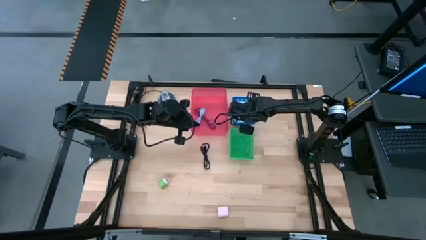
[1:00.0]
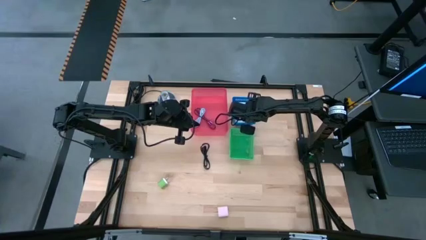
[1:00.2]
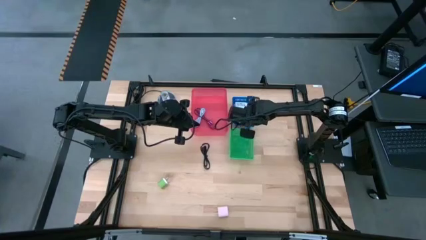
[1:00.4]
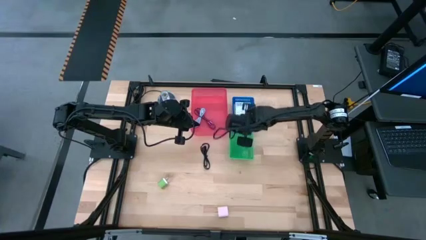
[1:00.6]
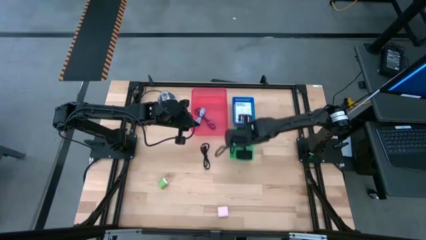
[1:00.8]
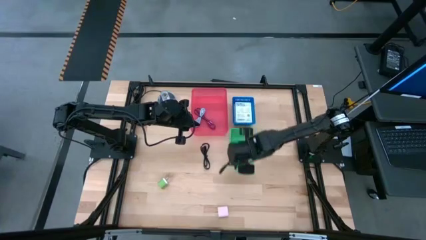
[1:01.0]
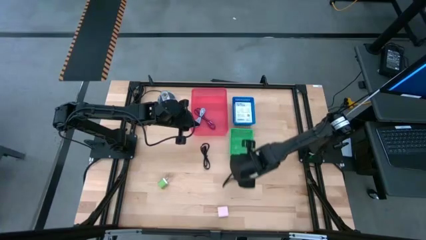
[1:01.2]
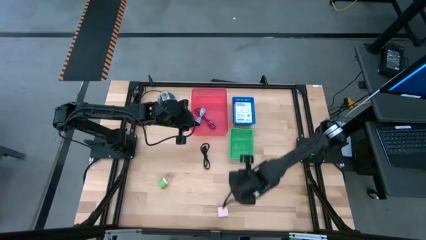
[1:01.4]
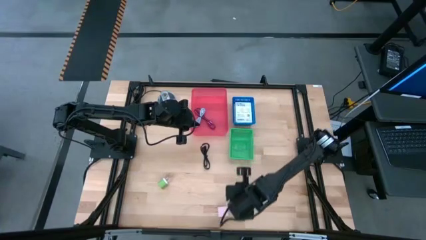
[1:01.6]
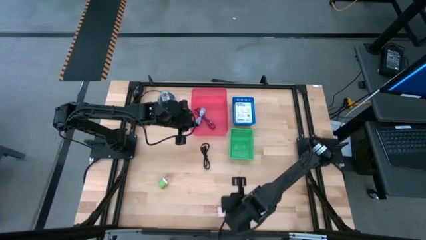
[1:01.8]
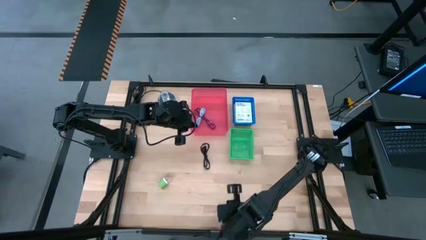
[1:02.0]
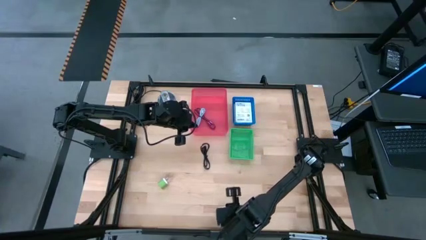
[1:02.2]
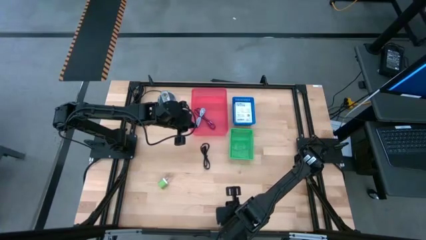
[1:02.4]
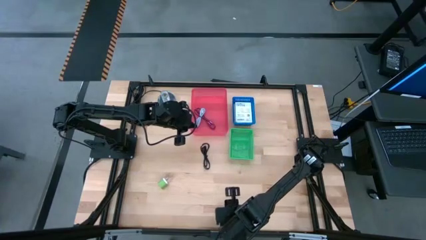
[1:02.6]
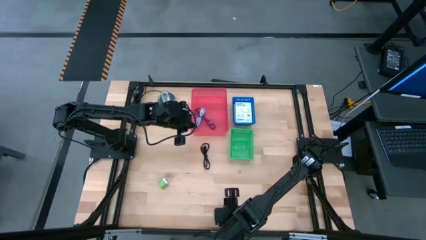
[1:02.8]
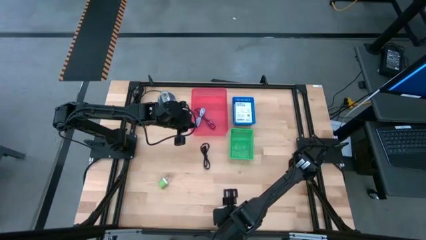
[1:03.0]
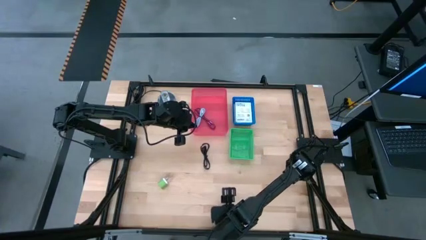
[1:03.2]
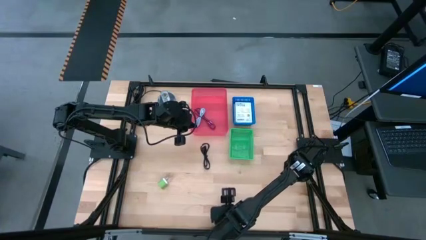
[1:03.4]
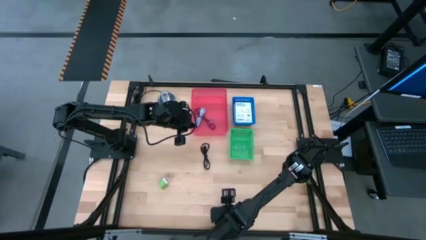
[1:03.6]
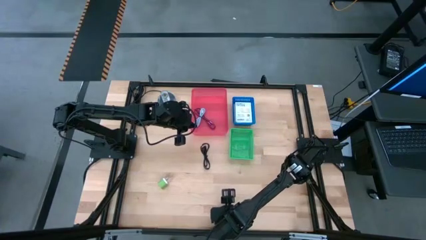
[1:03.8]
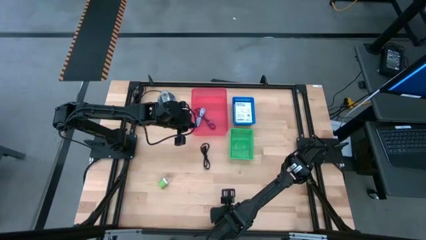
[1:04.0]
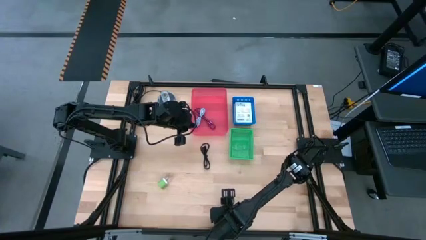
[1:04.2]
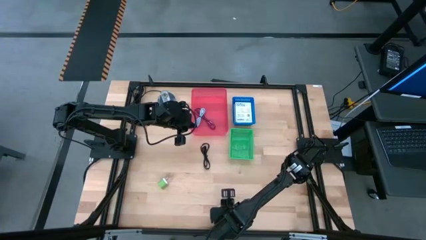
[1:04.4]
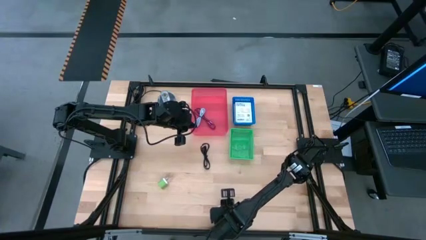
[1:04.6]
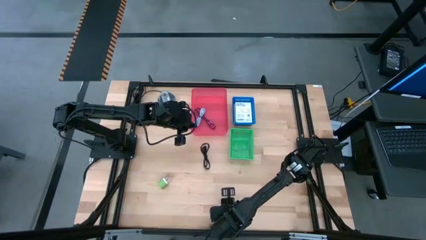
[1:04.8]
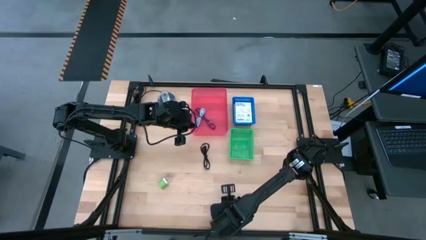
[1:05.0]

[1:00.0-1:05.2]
Task: Pick and place items into bin
Put the white charger adapter into the green bin

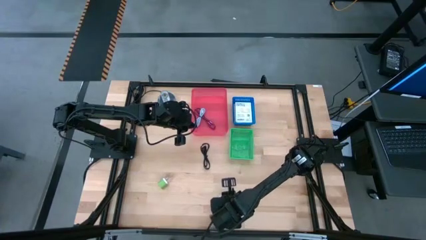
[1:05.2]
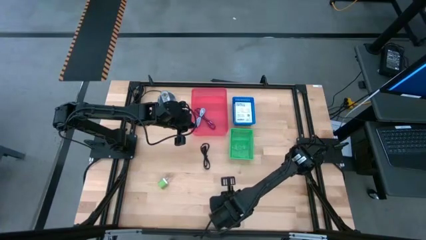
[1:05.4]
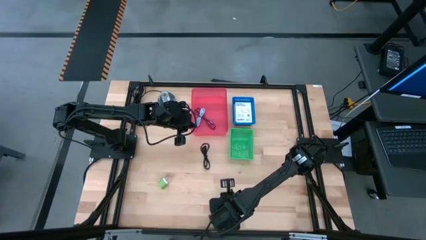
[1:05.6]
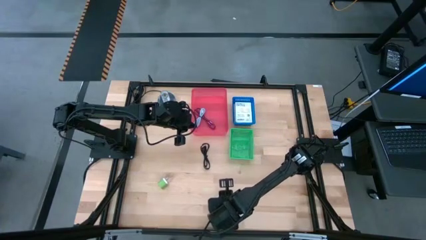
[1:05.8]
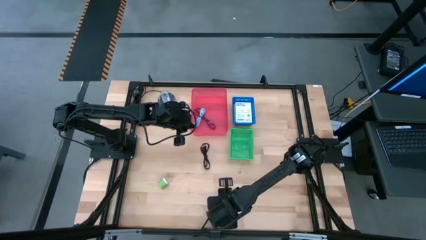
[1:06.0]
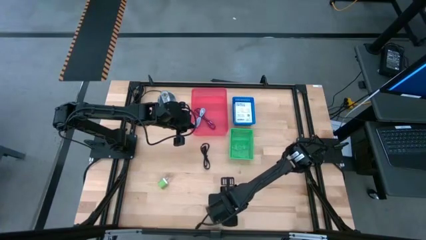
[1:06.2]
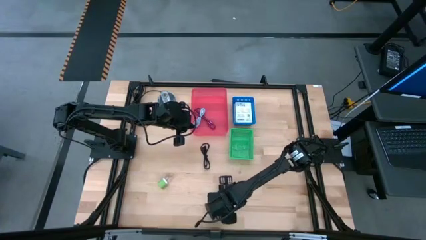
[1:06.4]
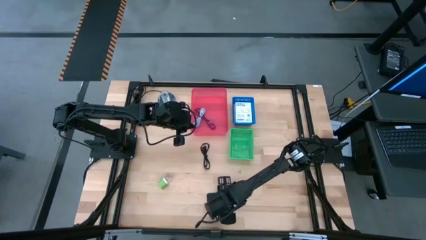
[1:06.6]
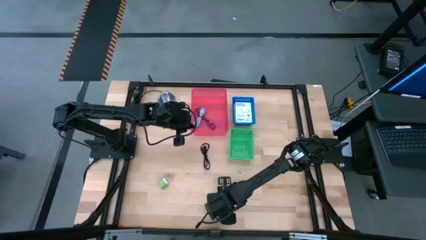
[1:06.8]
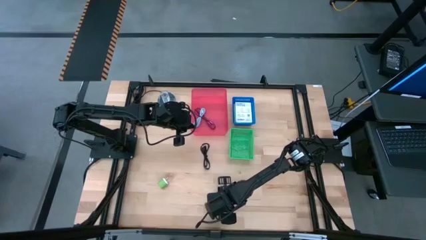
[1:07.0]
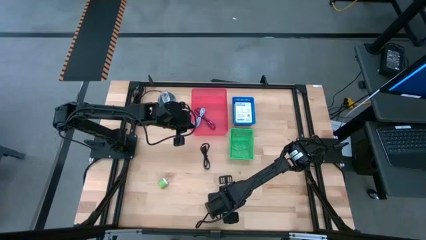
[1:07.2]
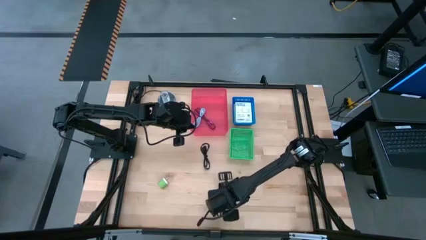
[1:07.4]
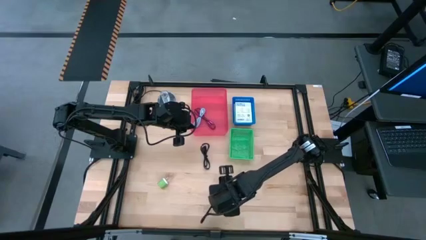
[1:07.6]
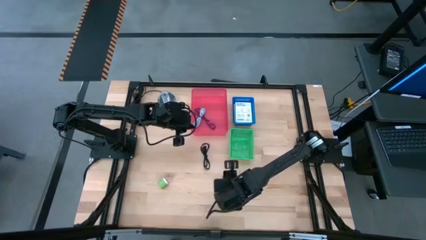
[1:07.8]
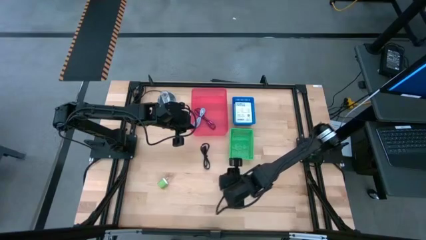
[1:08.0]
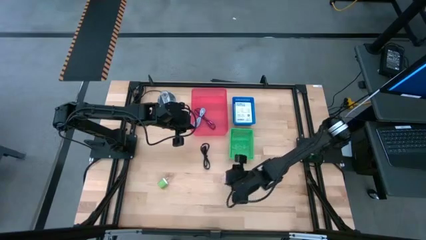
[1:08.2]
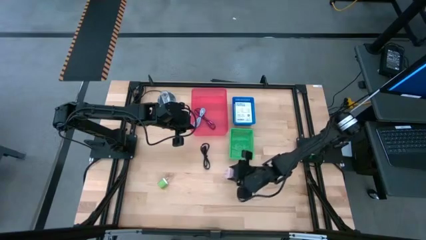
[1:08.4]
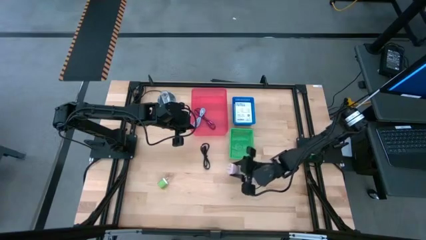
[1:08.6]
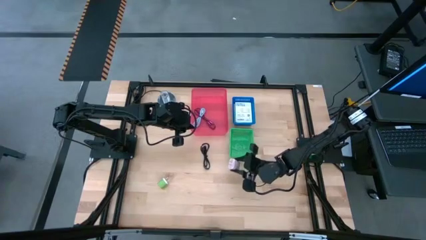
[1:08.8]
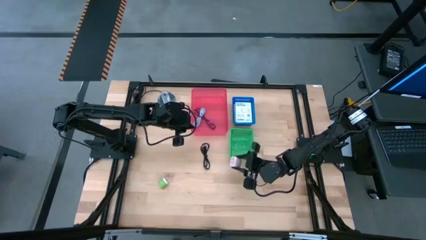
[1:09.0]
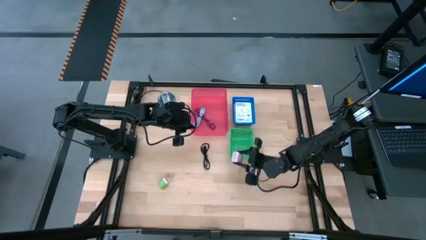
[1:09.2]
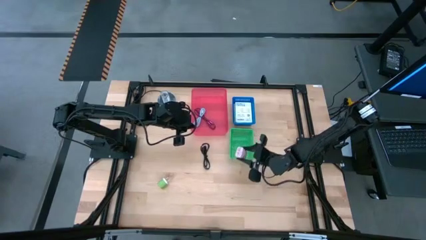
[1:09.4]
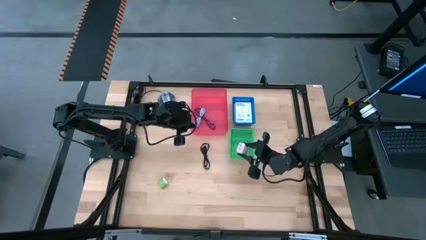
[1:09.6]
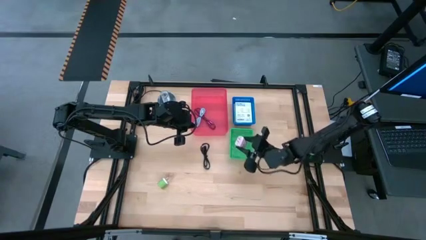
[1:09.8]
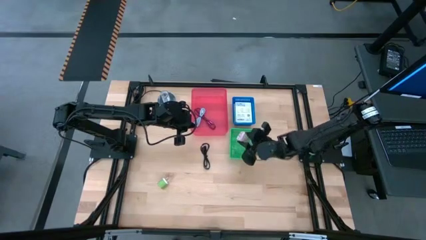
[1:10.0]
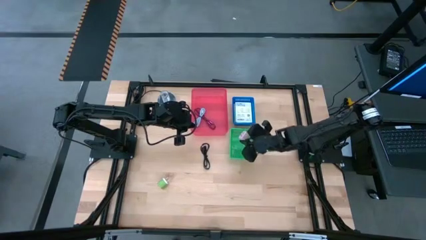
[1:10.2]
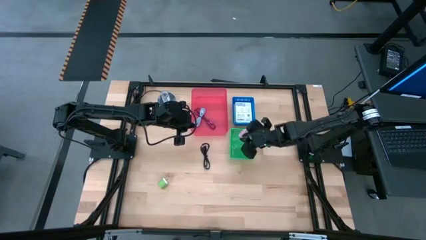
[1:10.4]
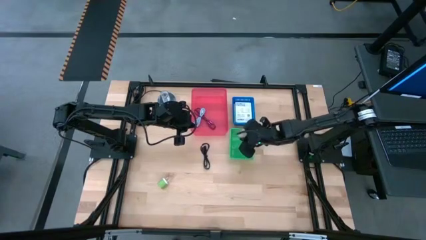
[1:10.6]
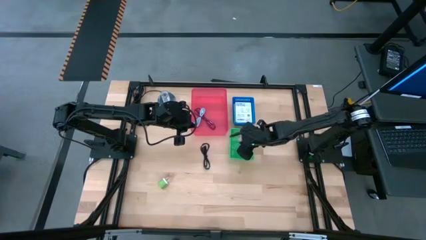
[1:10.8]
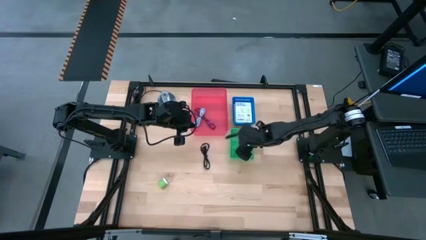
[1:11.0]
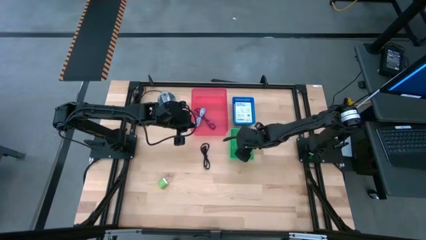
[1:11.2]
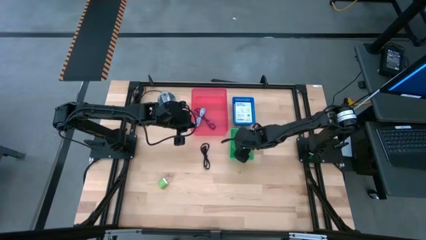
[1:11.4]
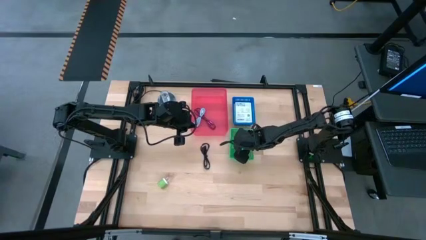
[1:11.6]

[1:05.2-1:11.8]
Put the white charger adapter into the green bin
